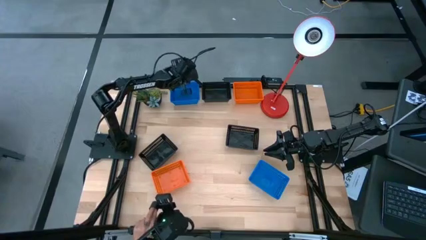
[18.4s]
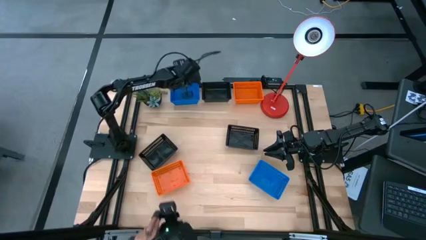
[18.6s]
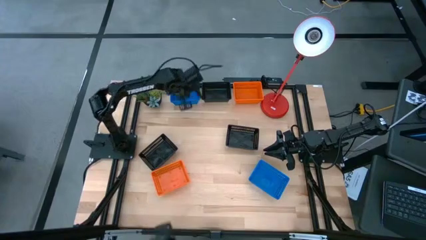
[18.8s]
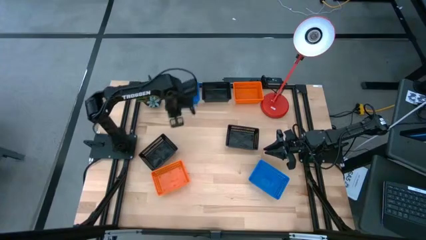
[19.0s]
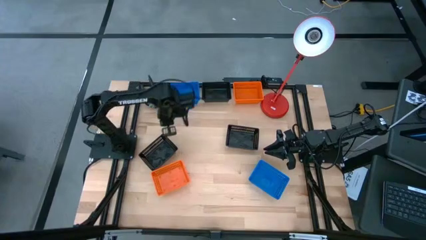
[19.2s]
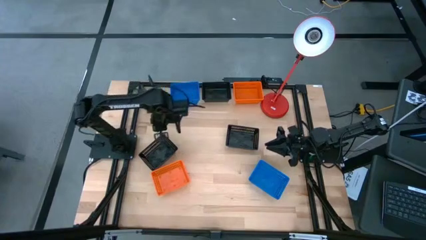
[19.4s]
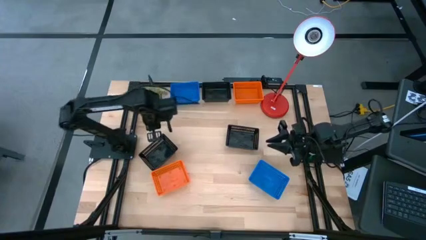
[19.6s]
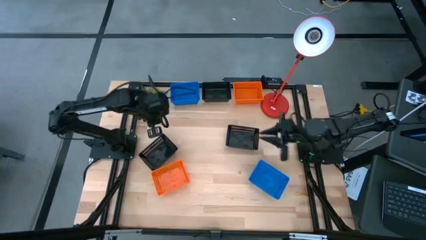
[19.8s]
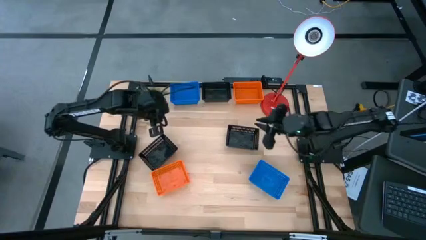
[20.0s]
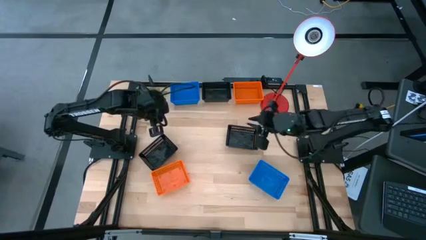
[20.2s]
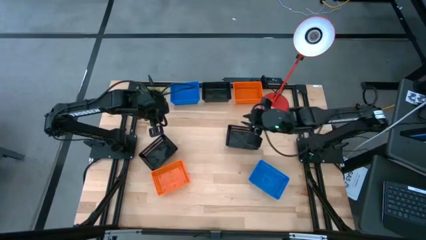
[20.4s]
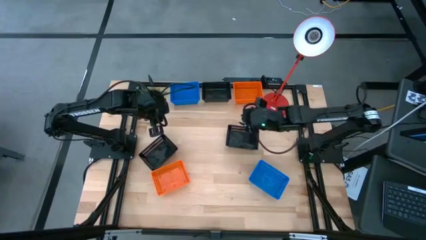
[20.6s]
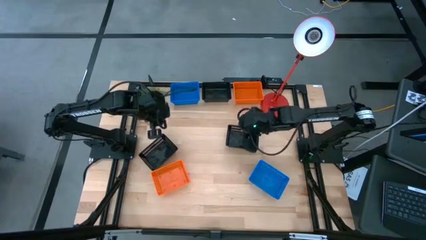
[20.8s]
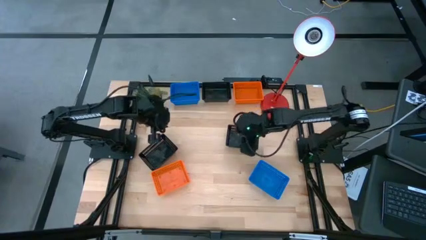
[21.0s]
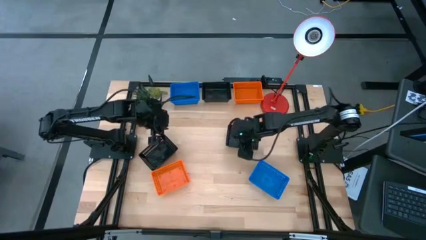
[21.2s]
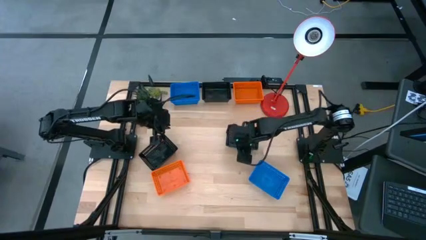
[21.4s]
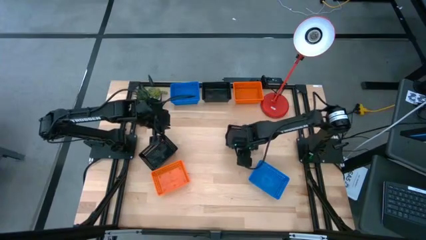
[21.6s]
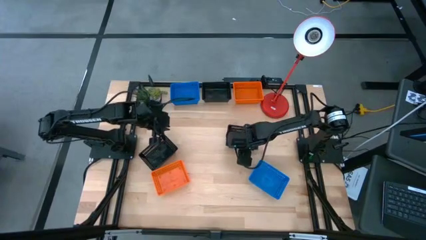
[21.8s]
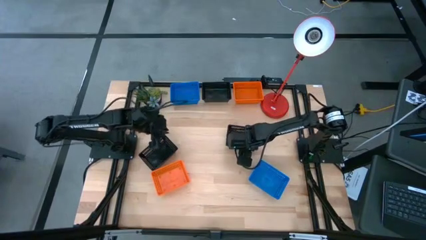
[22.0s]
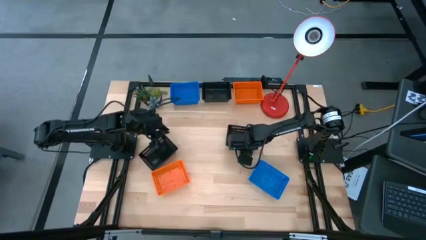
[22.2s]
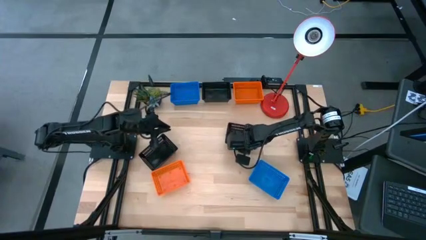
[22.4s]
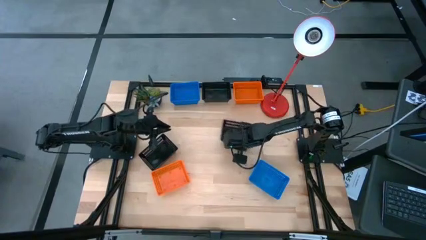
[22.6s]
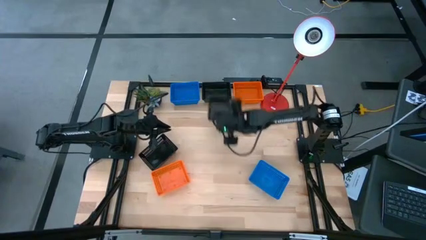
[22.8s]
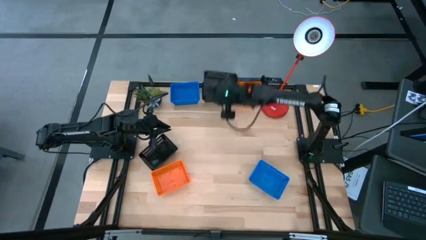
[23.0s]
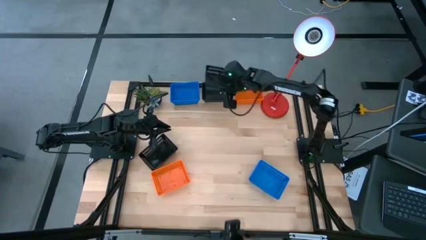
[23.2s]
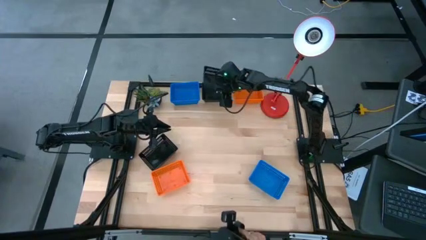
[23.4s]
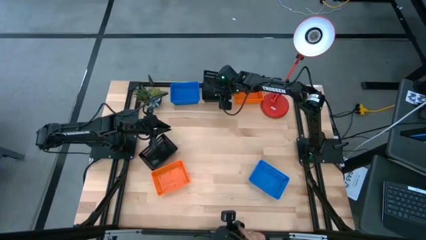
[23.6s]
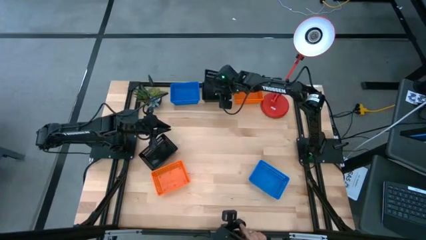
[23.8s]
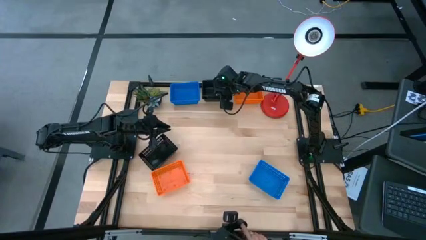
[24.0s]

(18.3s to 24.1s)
Stack the bottom right black bin on top of the top black bin

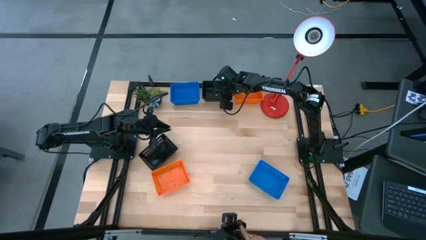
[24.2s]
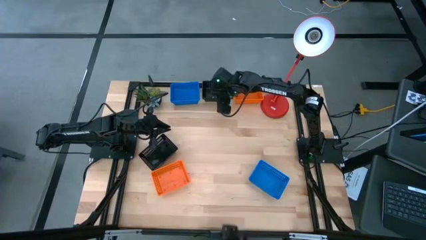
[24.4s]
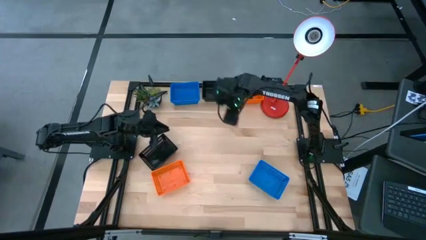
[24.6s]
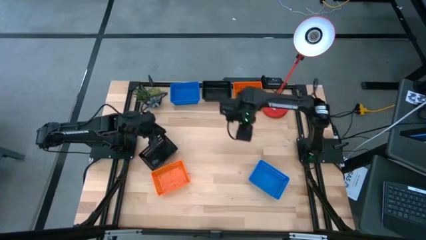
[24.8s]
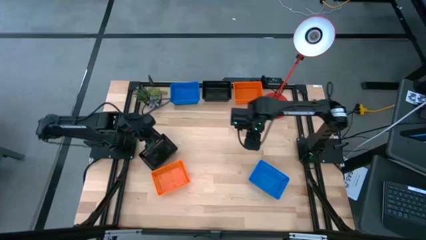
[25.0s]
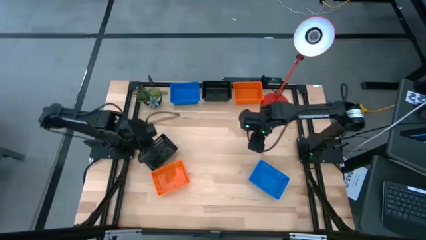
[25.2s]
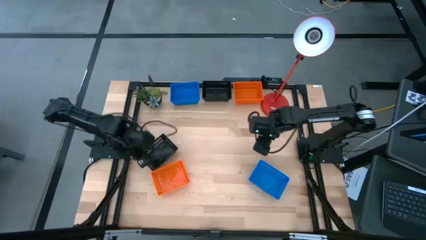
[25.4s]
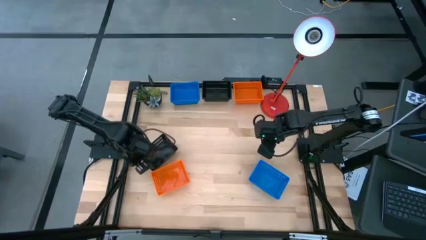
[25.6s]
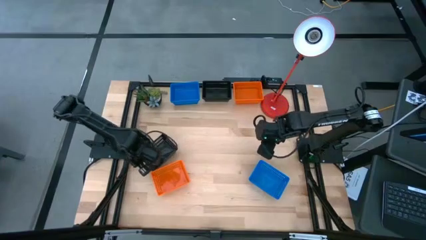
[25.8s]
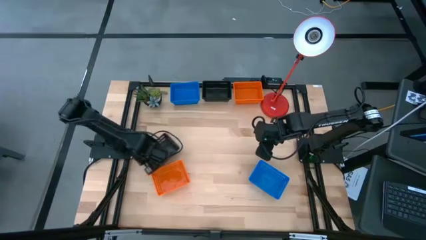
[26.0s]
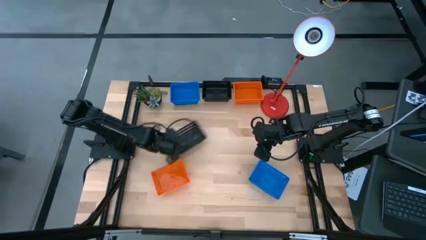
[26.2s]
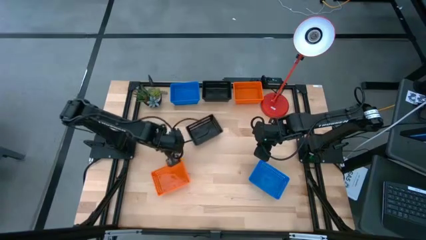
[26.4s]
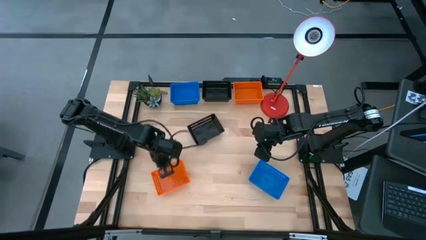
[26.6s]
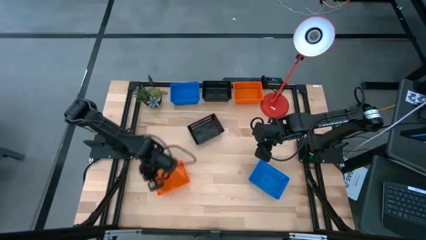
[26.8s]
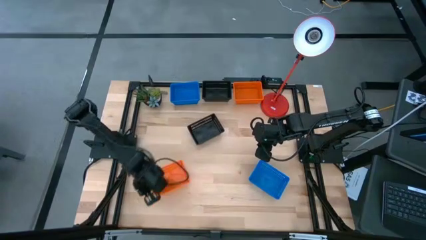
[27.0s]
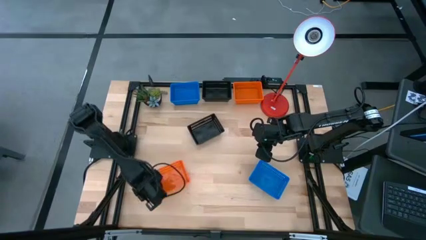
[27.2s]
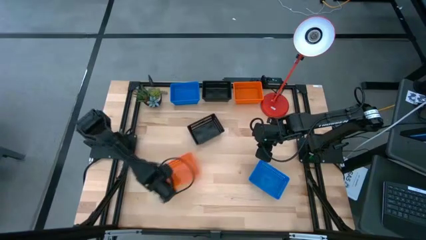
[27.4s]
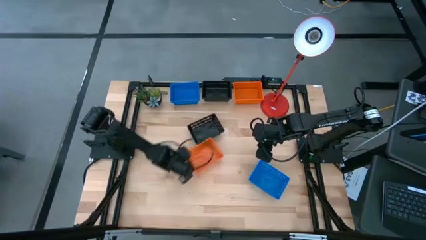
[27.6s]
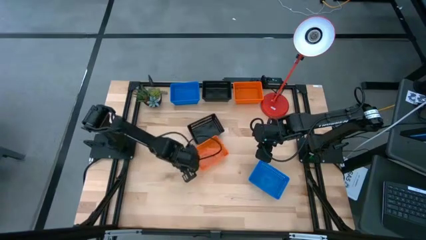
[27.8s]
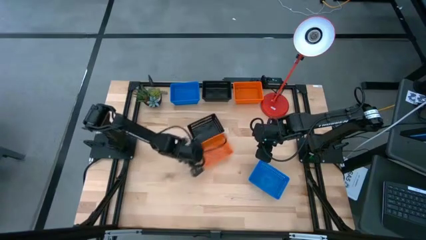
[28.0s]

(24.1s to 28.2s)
Move the bins to the center of the table

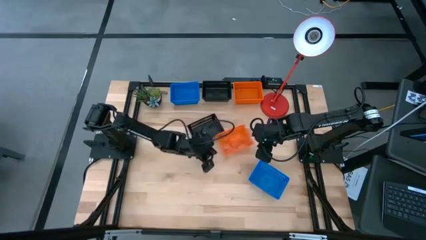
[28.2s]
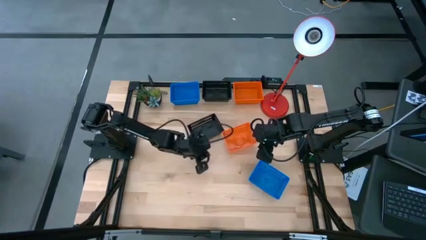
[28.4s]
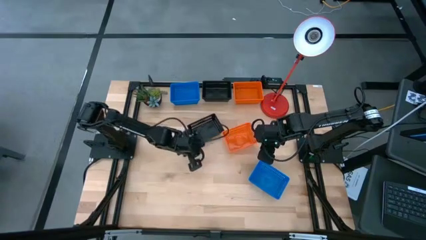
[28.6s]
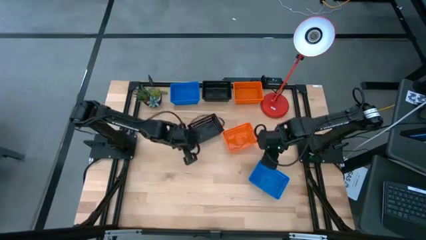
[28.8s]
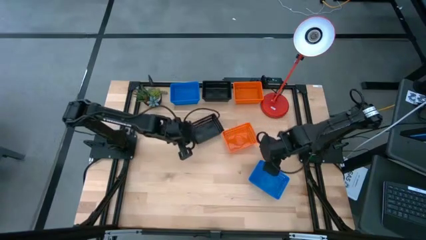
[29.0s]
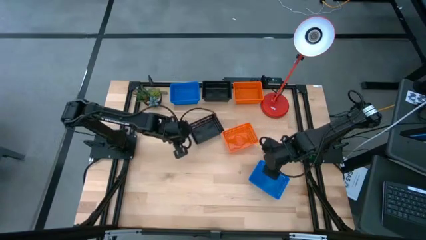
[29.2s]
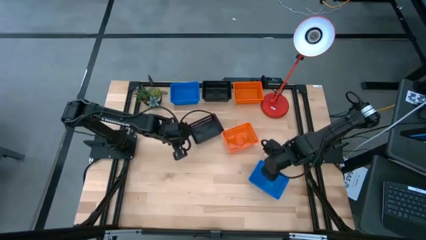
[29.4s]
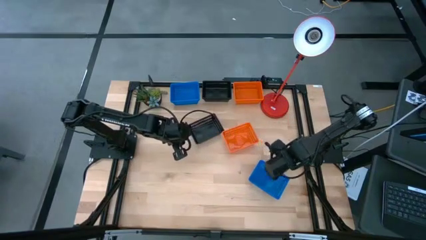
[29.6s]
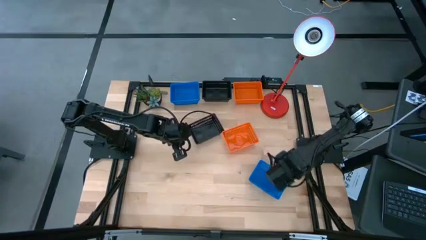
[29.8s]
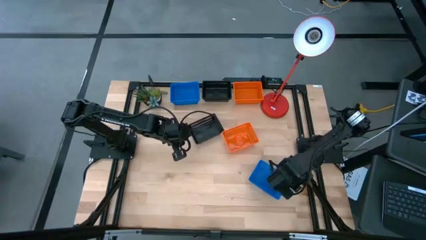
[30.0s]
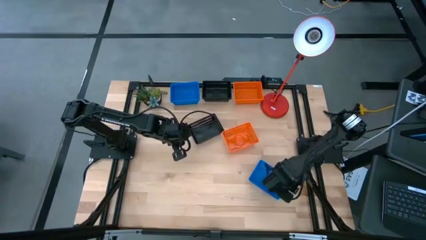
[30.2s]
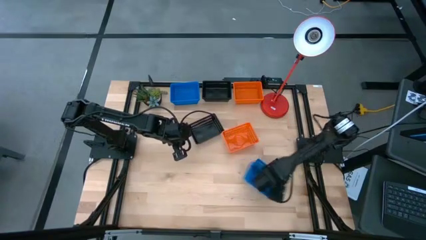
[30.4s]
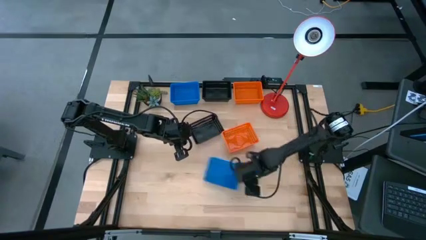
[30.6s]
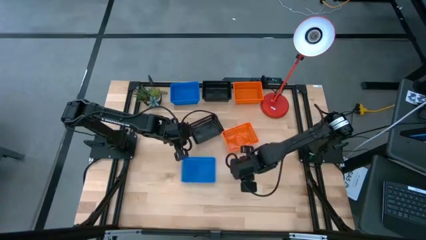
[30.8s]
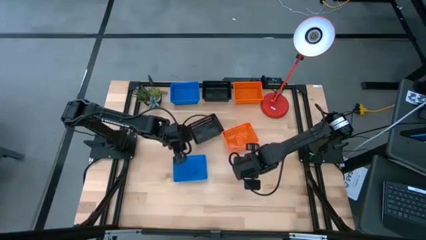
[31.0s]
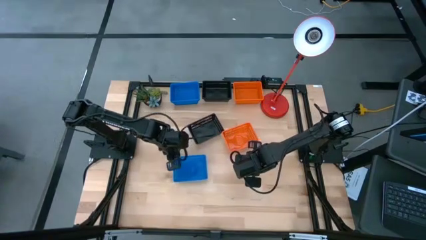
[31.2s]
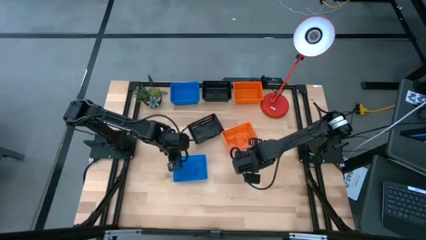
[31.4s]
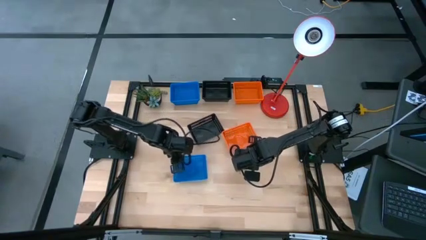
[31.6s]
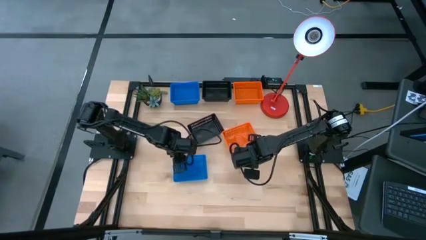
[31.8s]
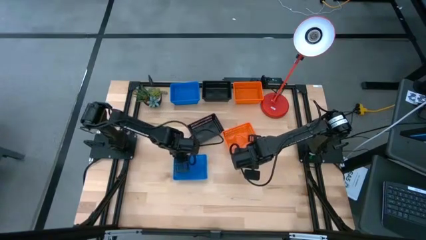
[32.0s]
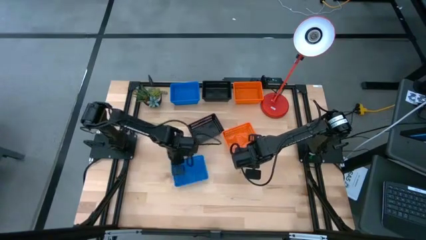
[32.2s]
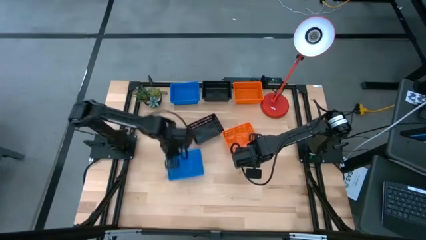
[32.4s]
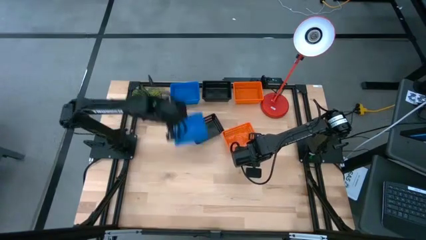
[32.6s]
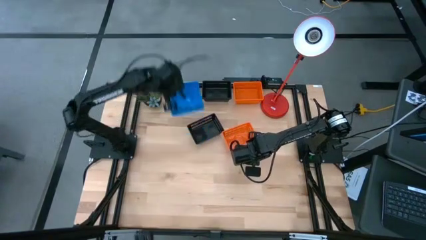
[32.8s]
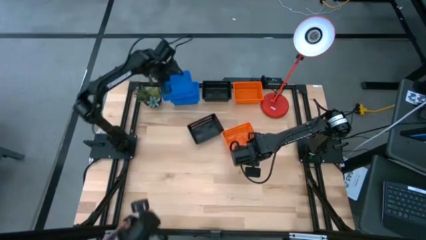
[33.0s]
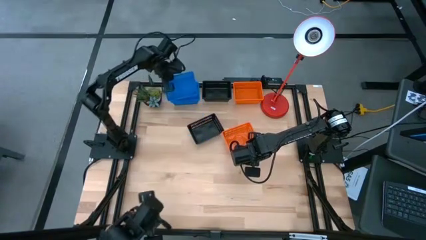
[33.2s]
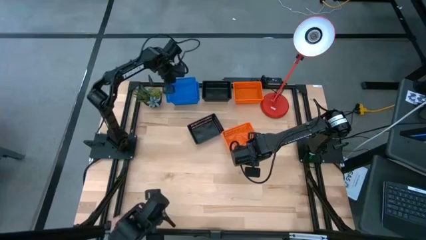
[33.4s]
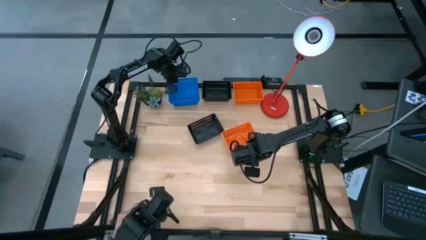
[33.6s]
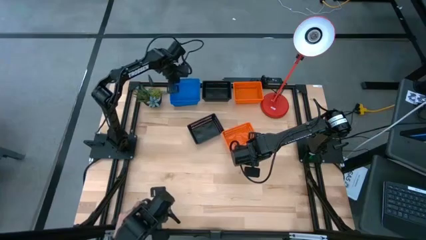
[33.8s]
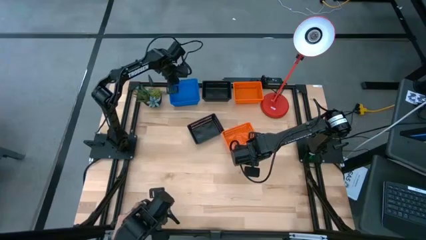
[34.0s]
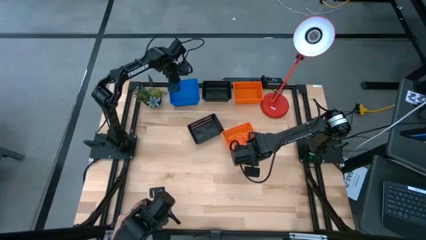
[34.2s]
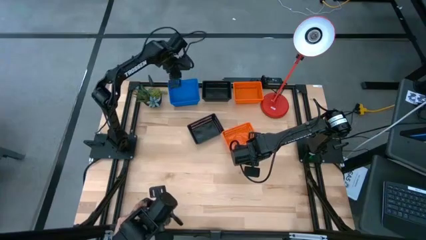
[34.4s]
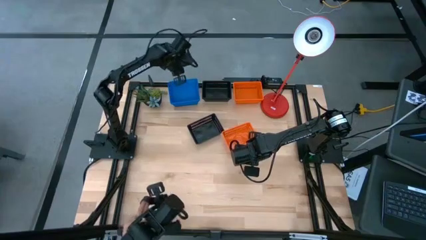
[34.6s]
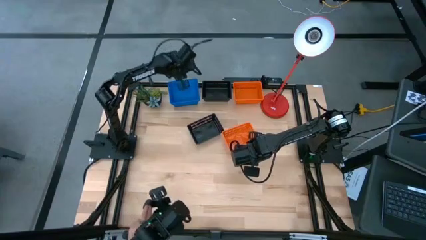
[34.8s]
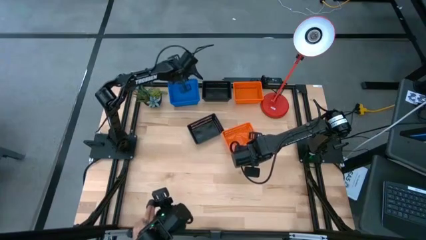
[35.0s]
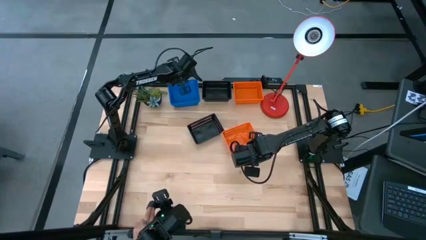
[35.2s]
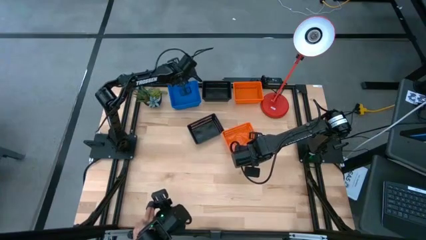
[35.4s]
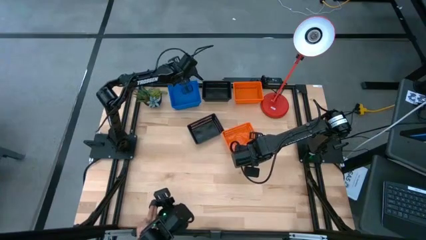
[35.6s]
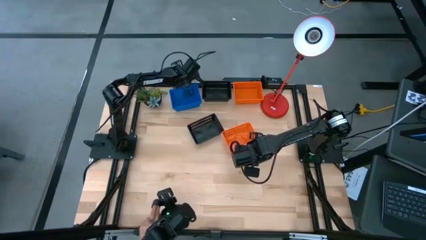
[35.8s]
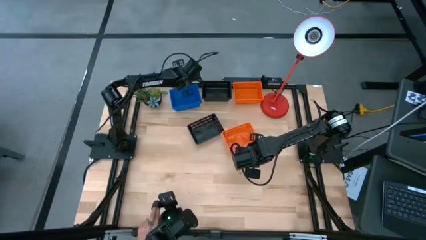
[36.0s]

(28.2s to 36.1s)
Stack the bottom blue bin on top of the top blue bins

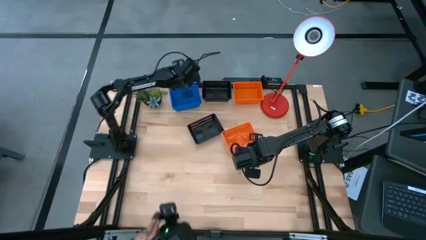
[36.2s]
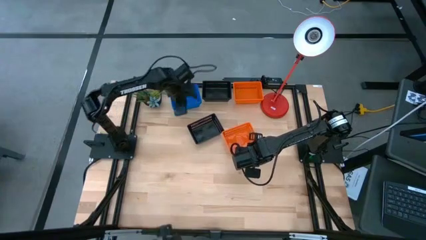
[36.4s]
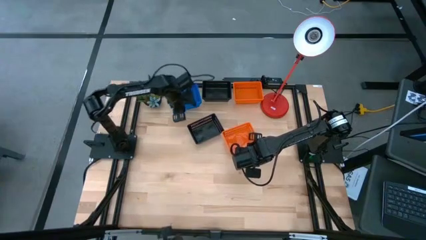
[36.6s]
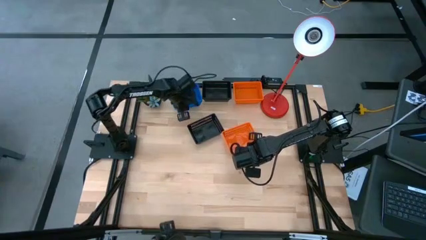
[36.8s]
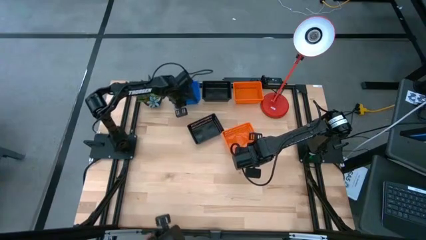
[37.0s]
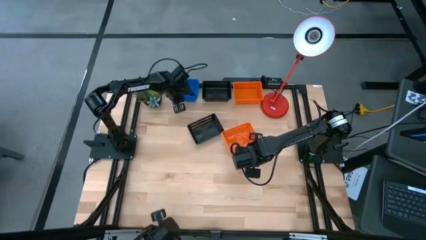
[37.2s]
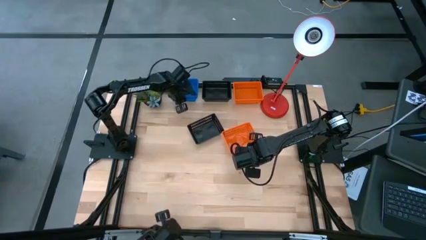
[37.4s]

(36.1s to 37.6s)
Adjust the stacked blue bins
